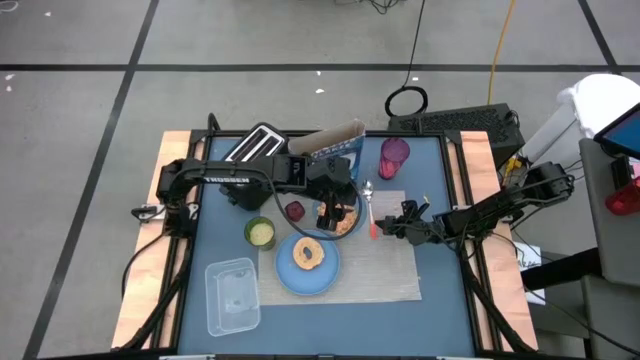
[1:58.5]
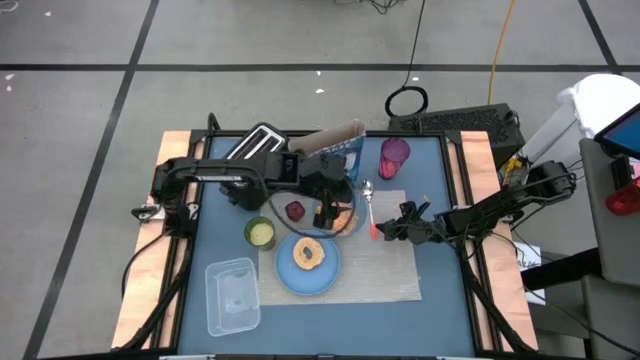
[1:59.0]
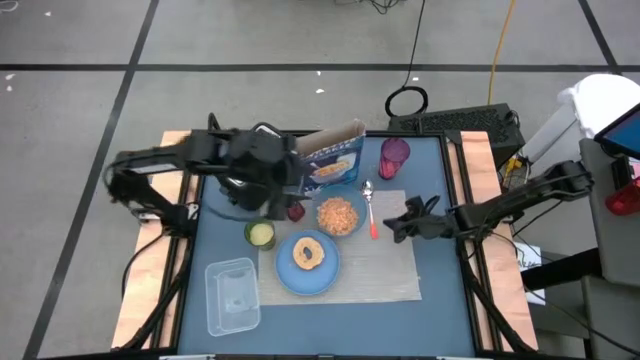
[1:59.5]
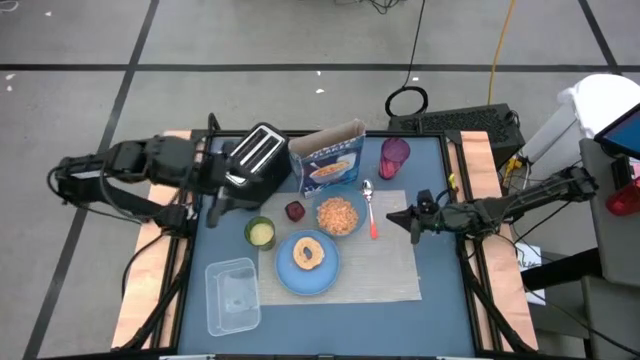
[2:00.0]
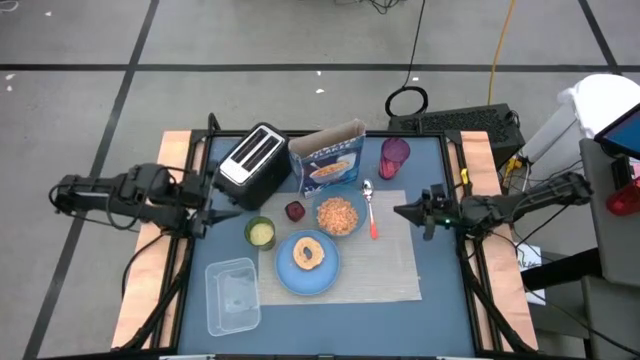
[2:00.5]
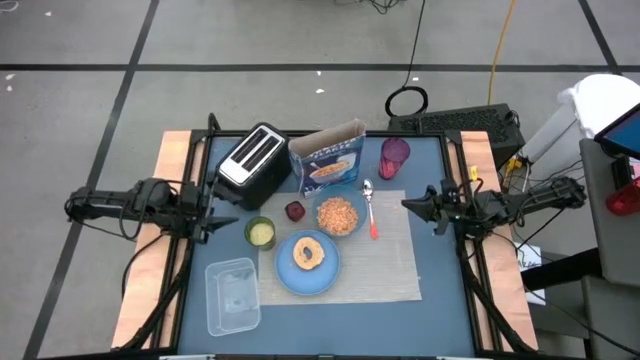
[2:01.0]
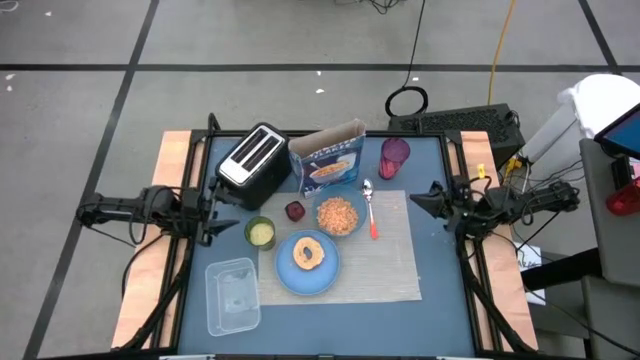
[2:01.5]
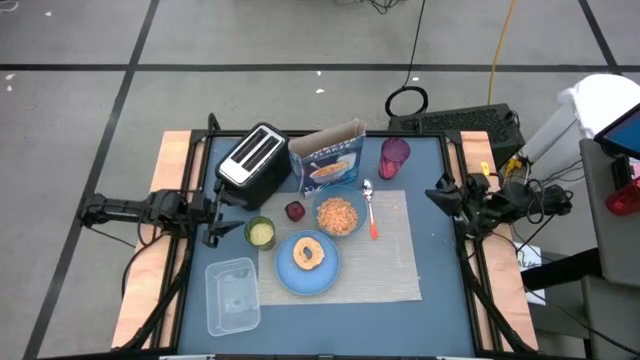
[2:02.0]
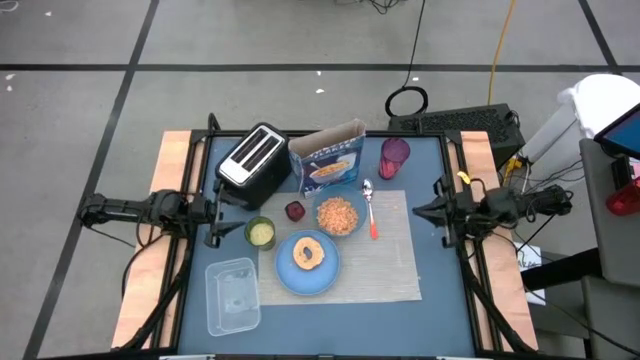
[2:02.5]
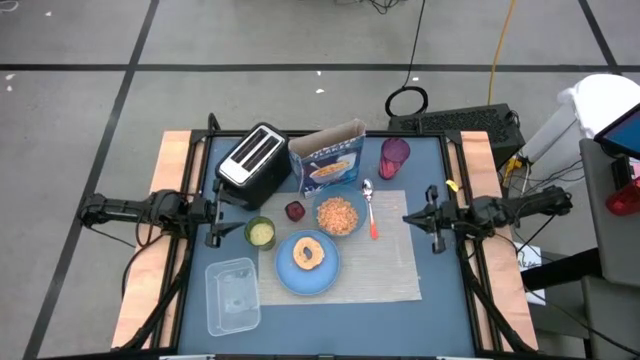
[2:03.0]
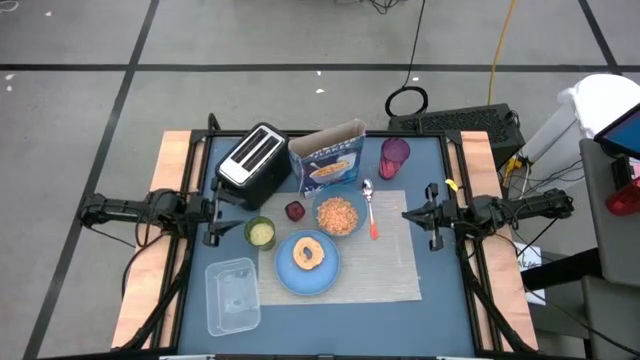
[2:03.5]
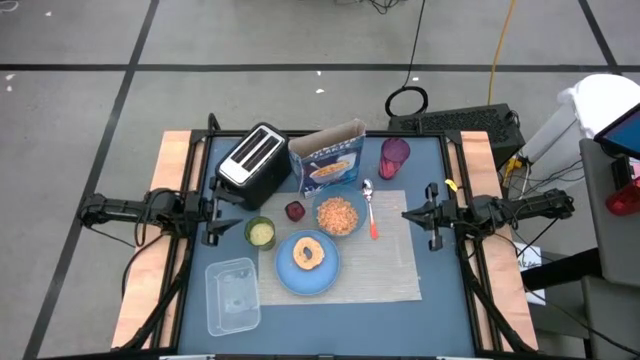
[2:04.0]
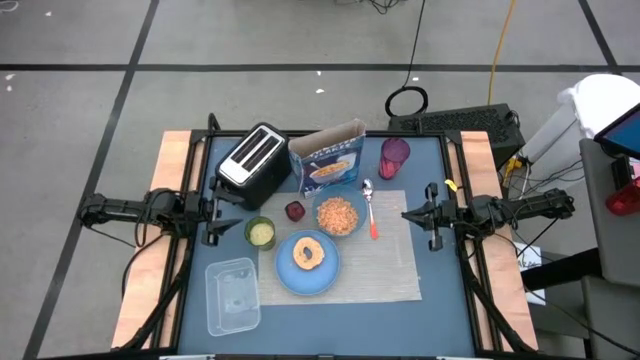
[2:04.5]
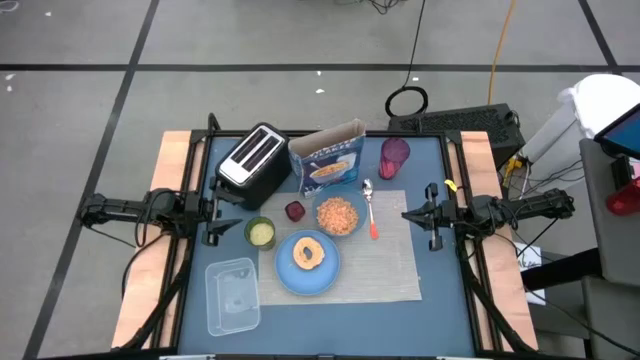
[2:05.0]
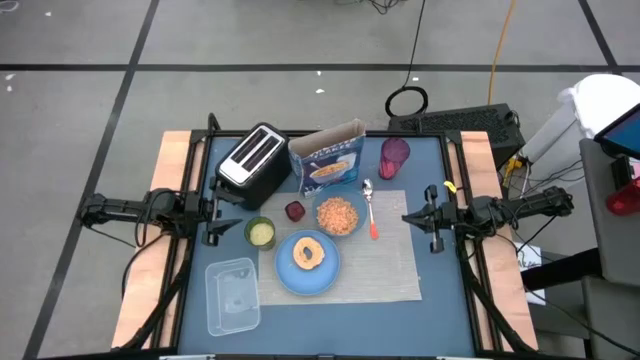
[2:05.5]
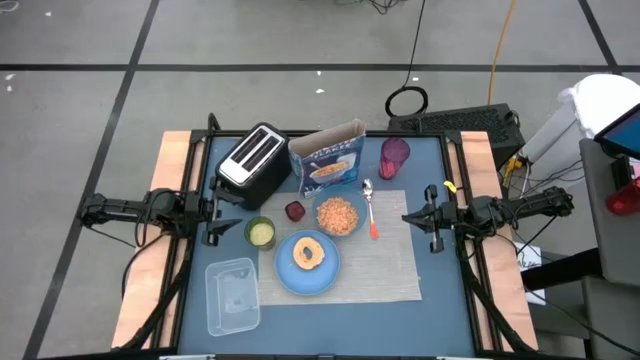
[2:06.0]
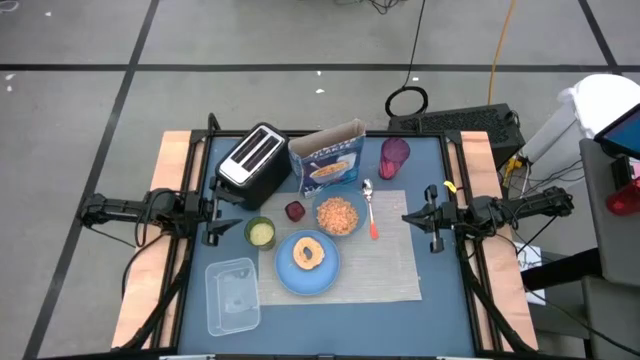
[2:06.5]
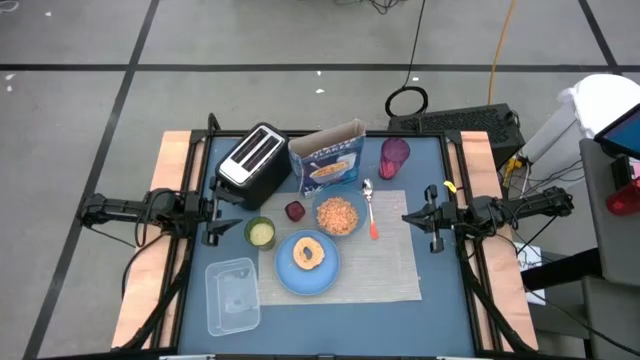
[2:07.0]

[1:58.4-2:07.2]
Task: Arrange a breakfast setting
Return to Home Position

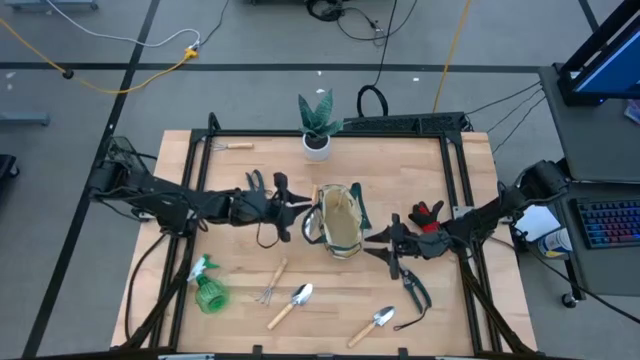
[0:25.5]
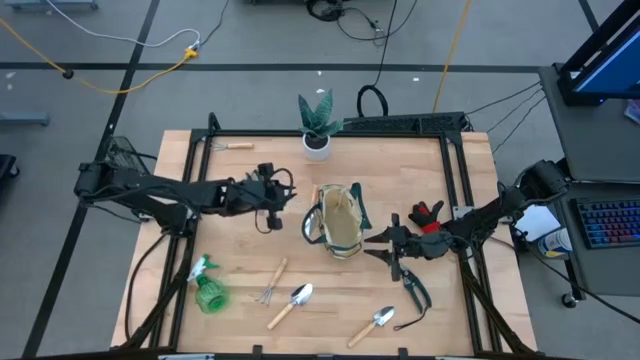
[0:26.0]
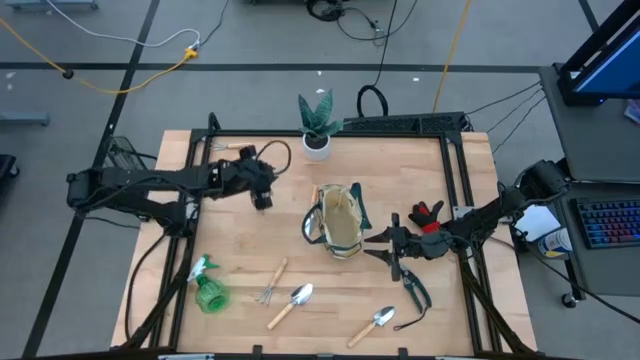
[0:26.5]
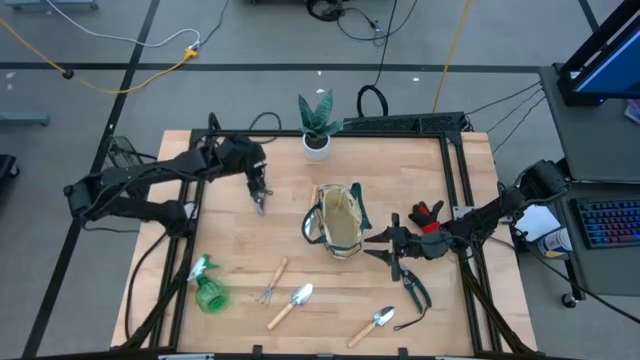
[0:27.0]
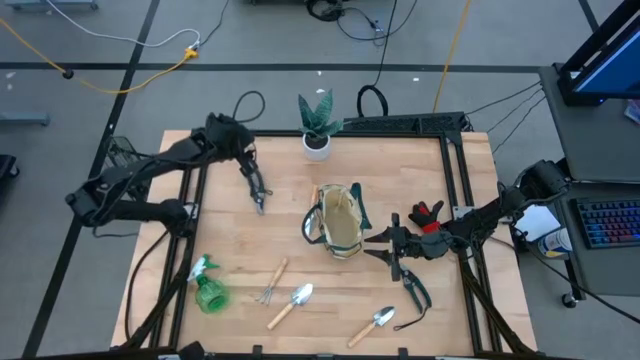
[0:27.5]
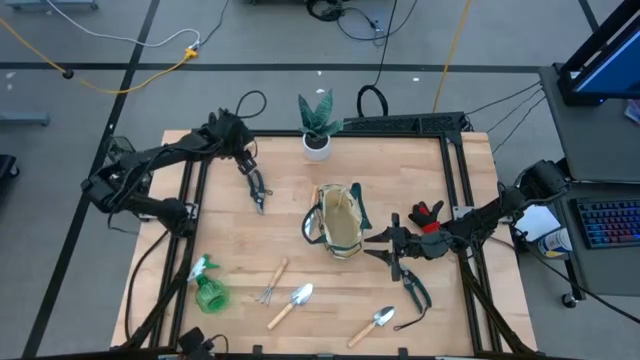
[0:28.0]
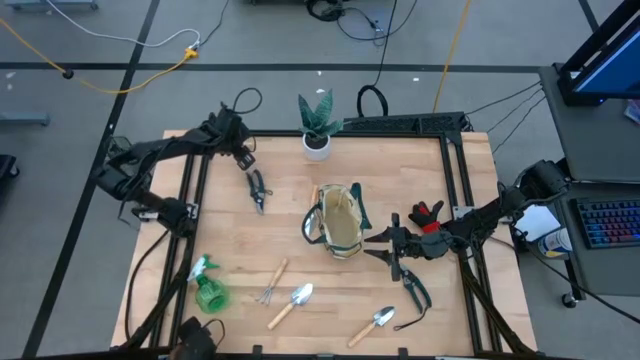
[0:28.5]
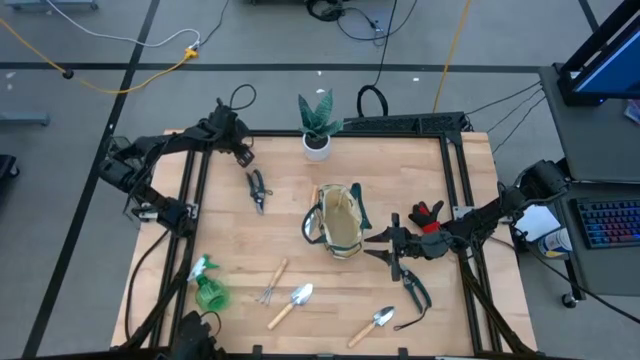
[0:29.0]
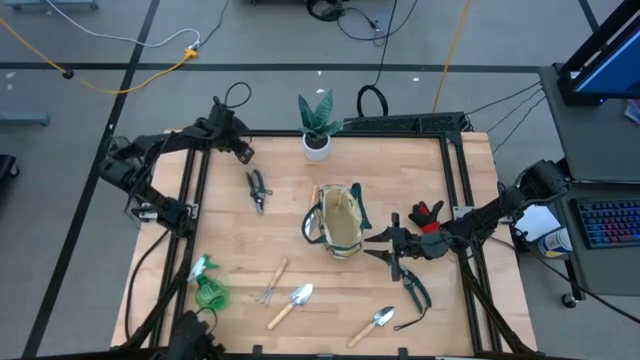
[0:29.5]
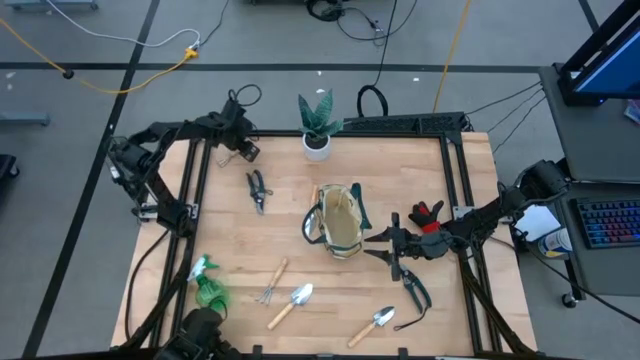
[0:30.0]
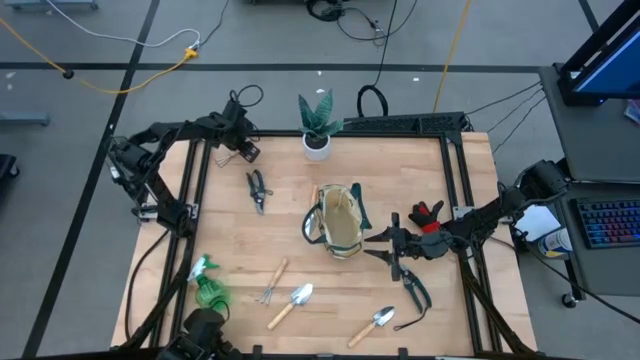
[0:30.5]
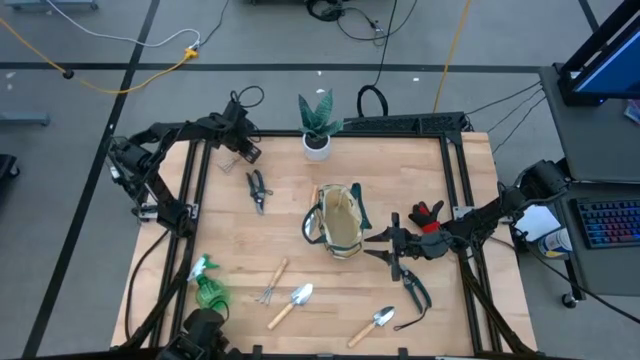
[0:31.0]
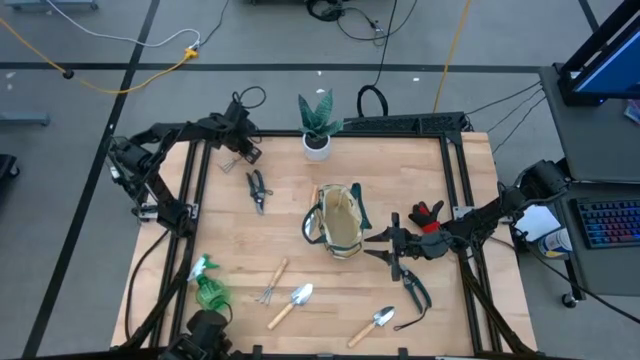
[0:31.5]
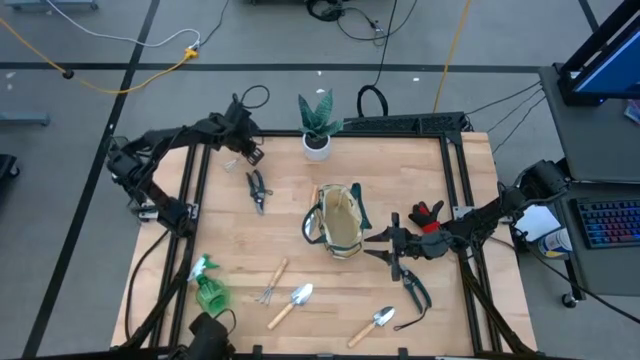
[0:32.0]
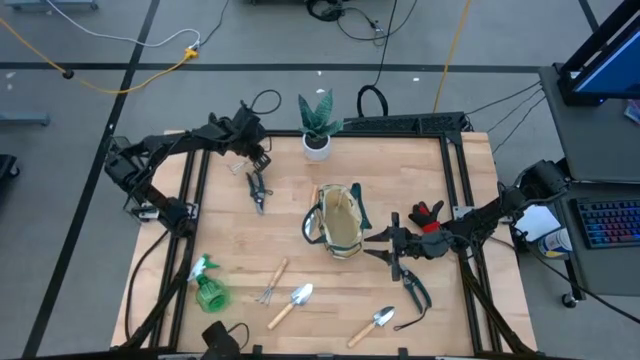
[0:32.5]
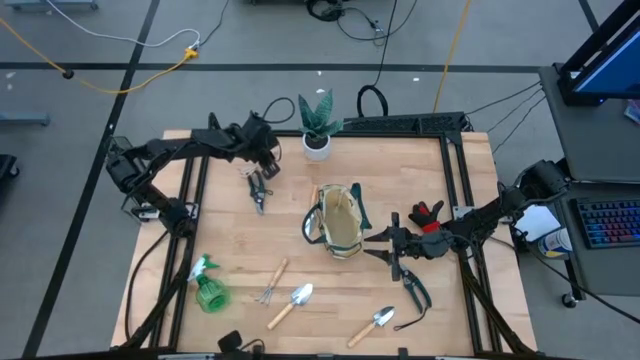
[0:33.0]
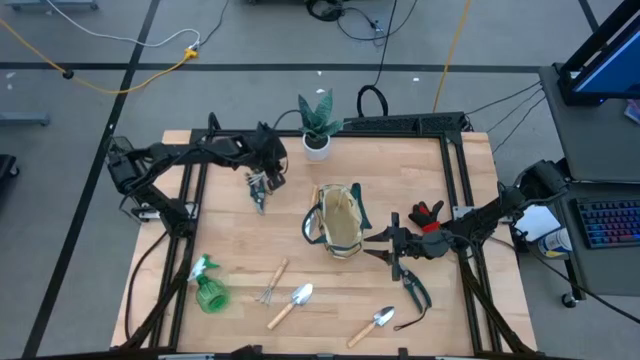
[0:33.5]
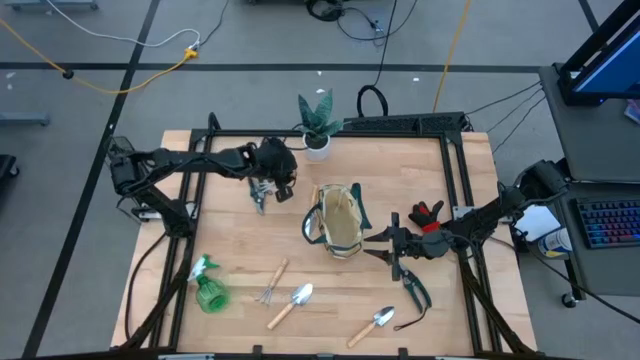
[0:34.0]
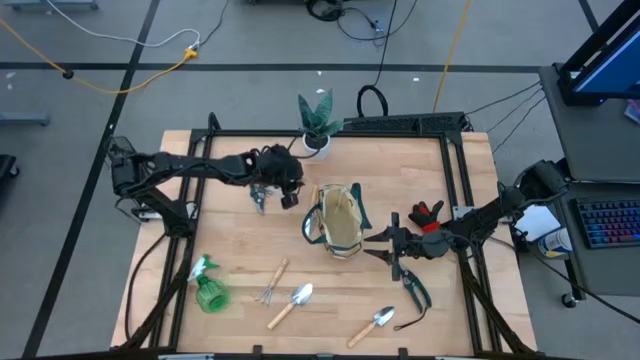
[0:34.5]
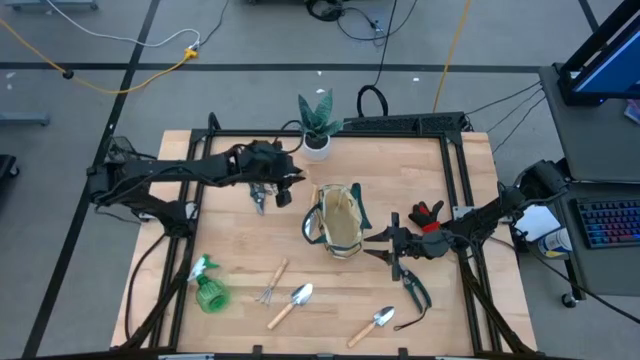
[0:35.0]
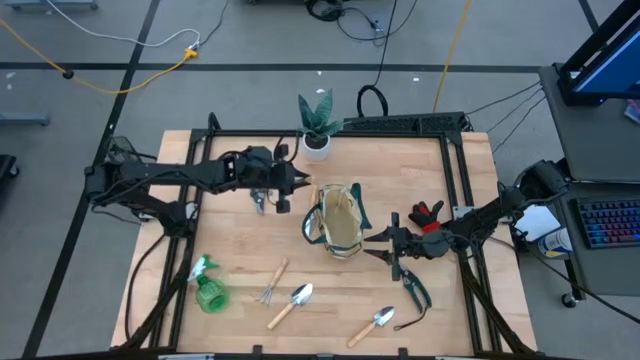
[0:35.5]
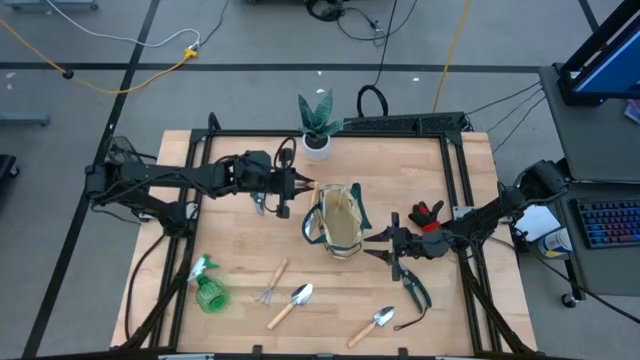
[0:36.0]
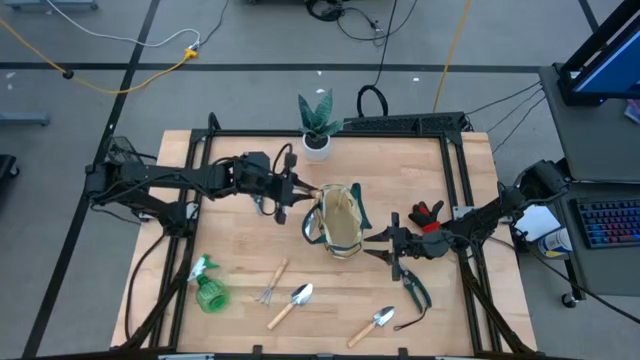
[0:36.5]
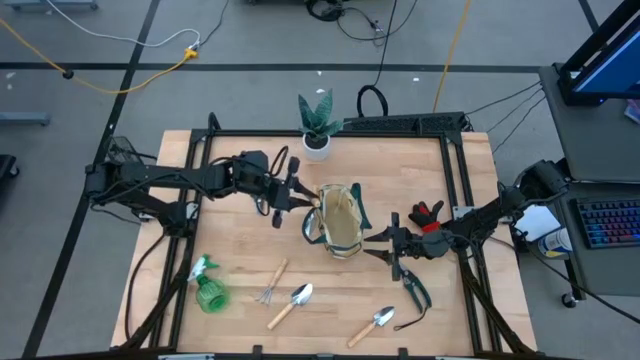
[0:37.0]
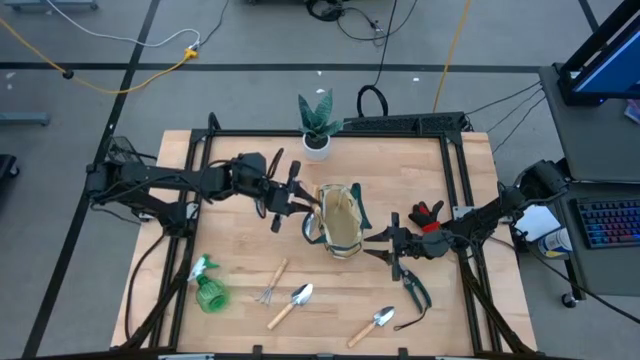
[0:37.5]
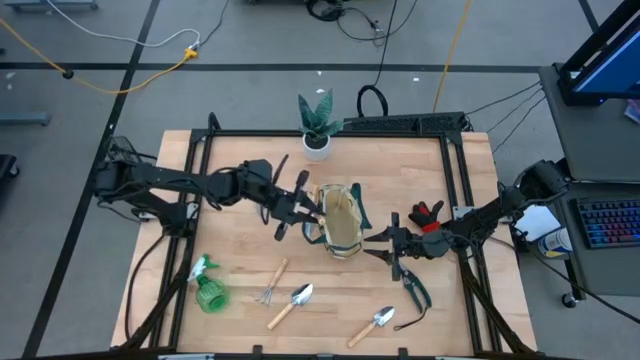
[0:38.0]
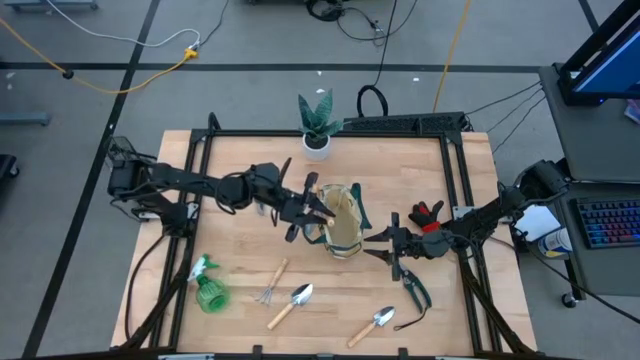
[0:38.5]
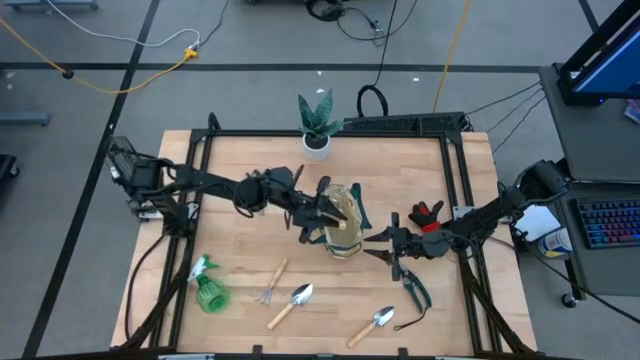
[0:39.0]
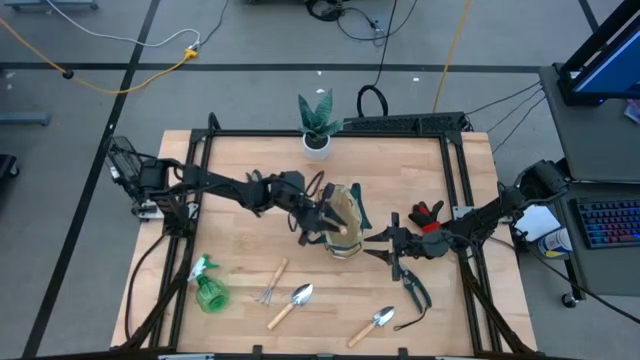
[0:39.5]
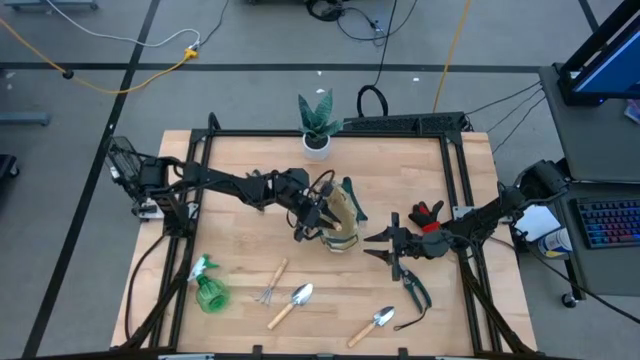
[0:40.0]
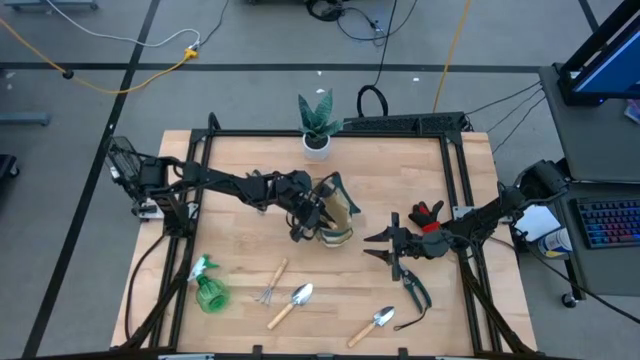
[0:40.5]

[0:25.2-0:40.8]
Task: Pick & Place Garden tools in Gardening bag
Put the top brown hand rake into the gardening bag
